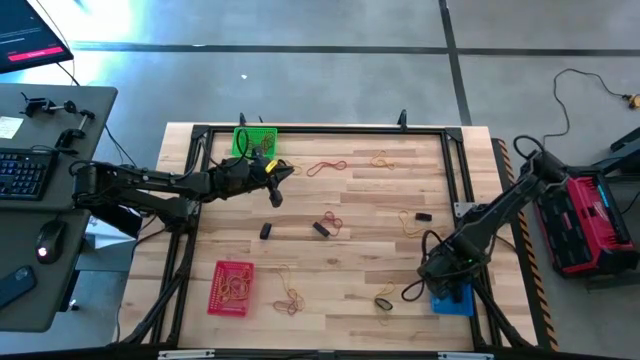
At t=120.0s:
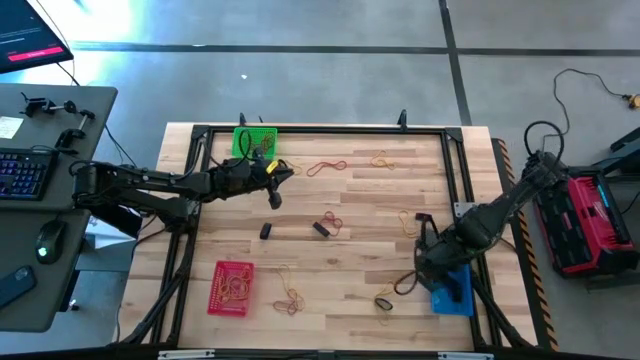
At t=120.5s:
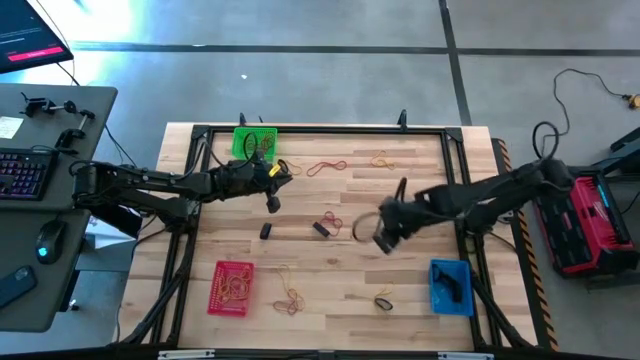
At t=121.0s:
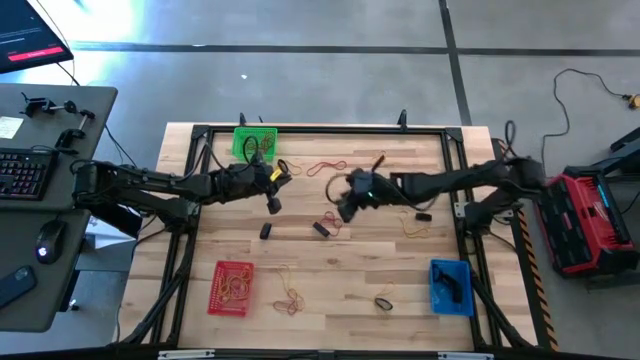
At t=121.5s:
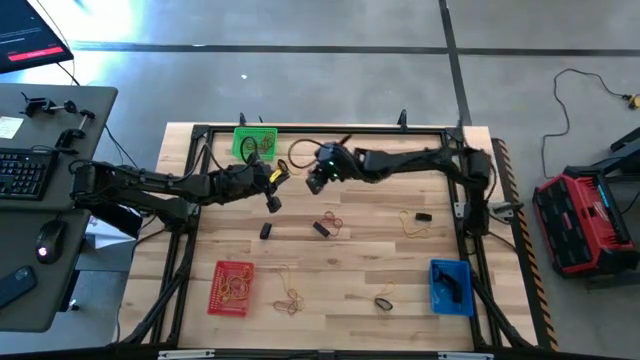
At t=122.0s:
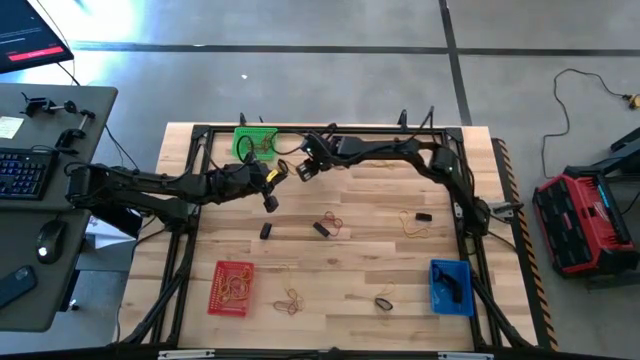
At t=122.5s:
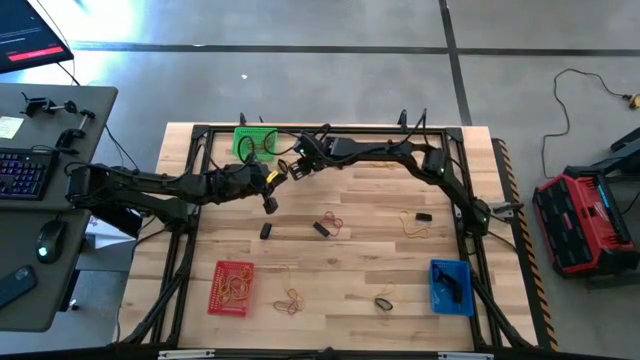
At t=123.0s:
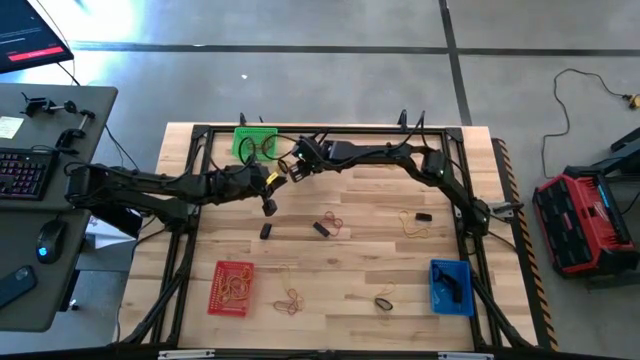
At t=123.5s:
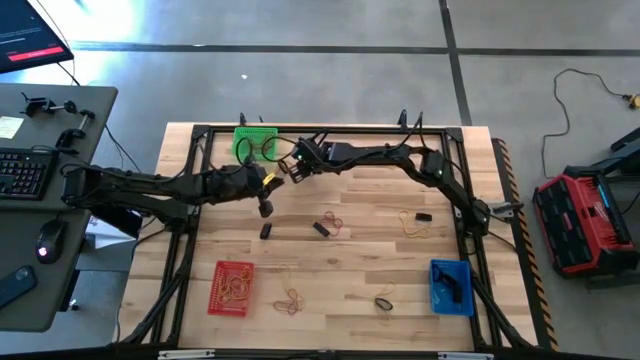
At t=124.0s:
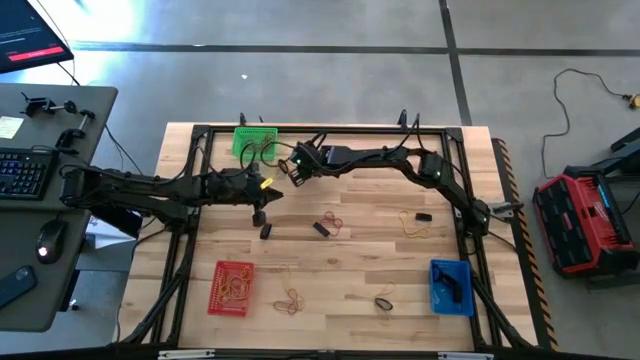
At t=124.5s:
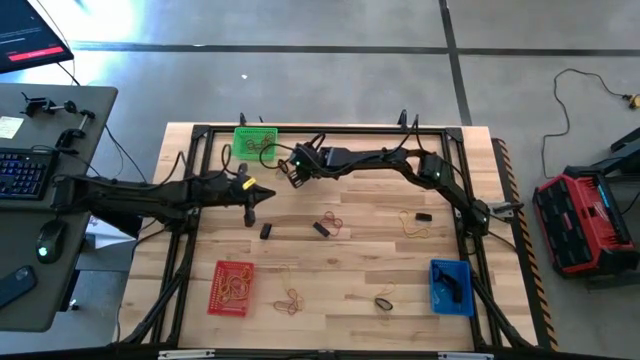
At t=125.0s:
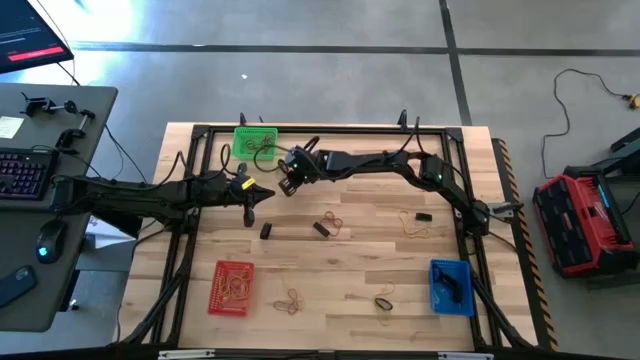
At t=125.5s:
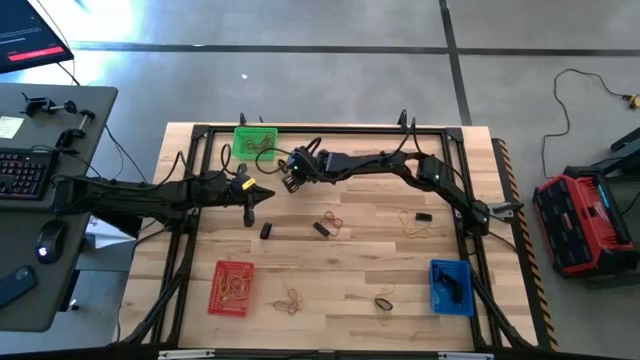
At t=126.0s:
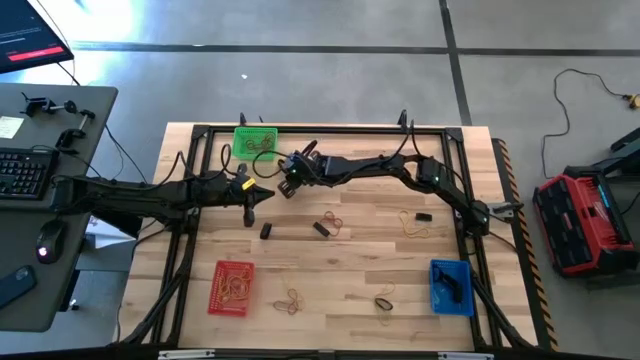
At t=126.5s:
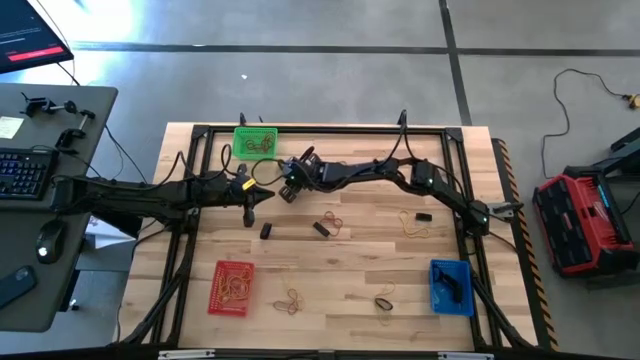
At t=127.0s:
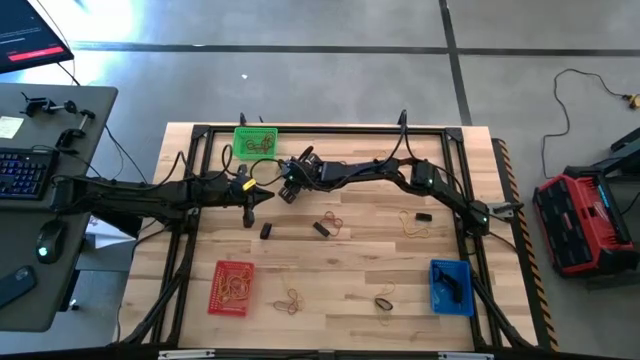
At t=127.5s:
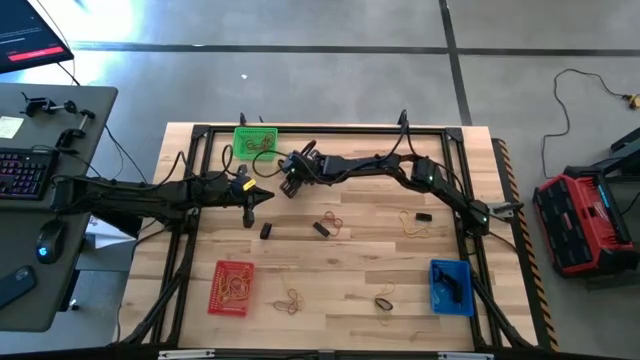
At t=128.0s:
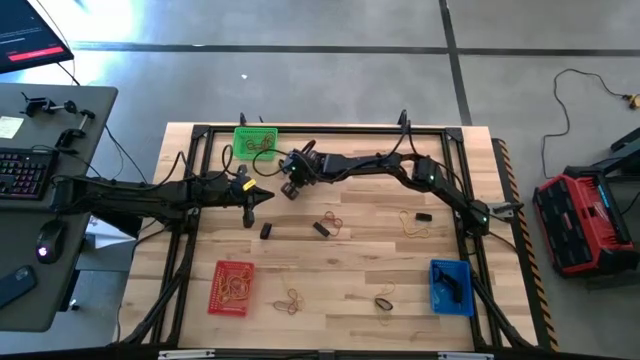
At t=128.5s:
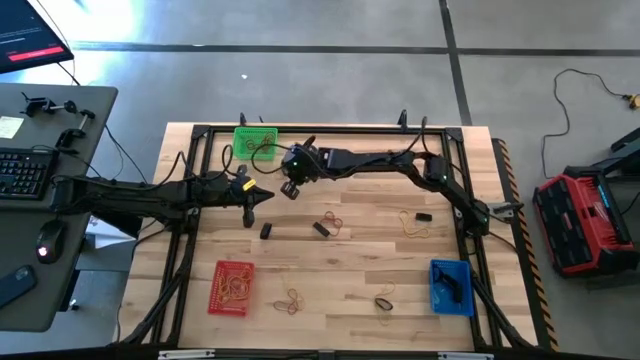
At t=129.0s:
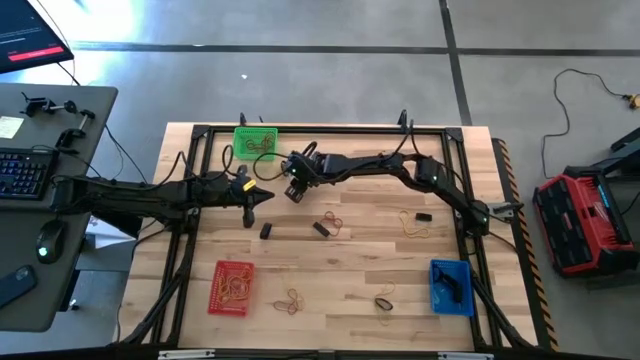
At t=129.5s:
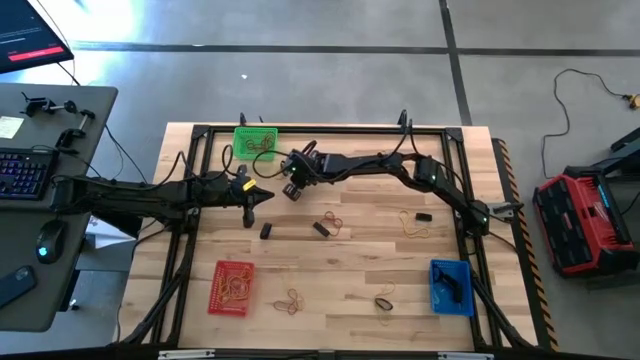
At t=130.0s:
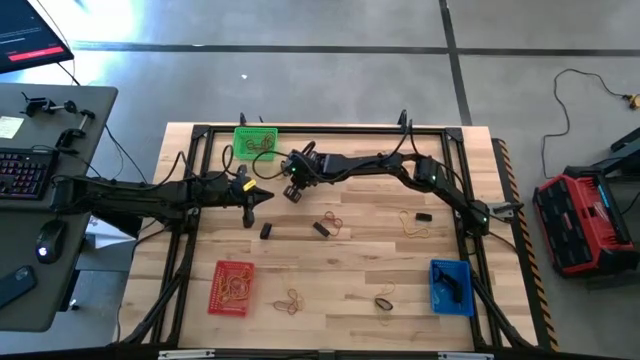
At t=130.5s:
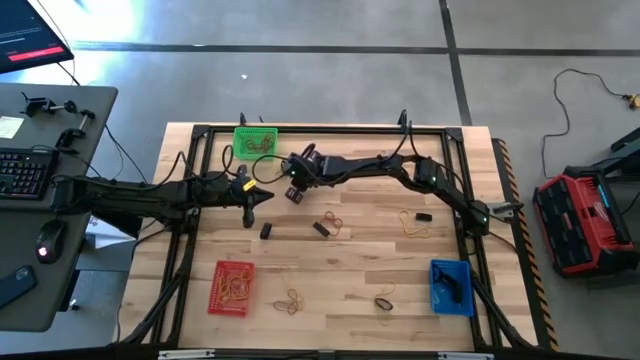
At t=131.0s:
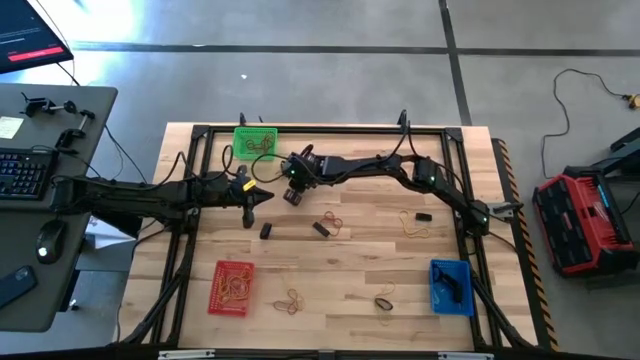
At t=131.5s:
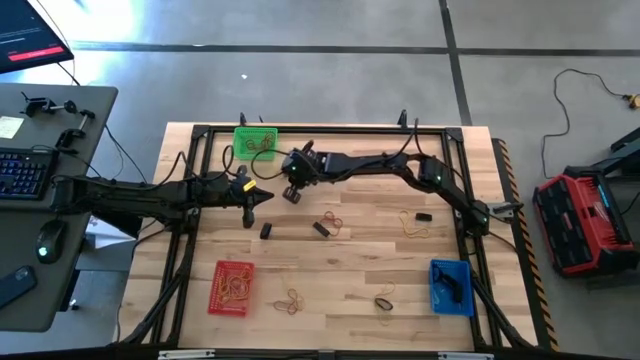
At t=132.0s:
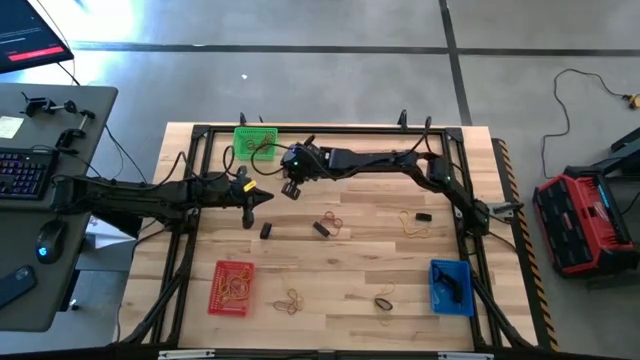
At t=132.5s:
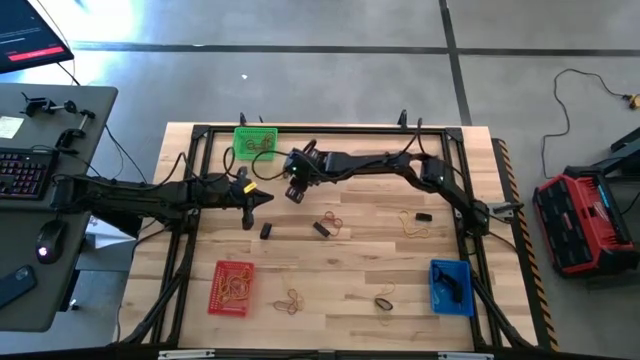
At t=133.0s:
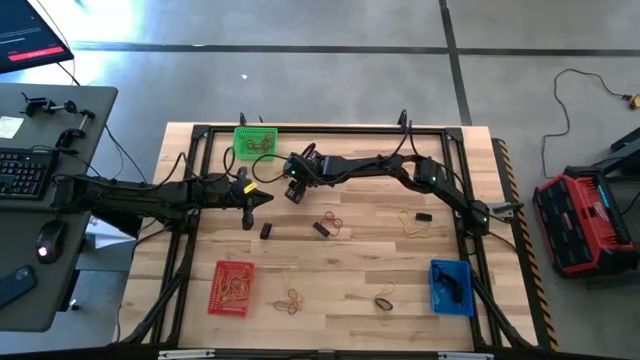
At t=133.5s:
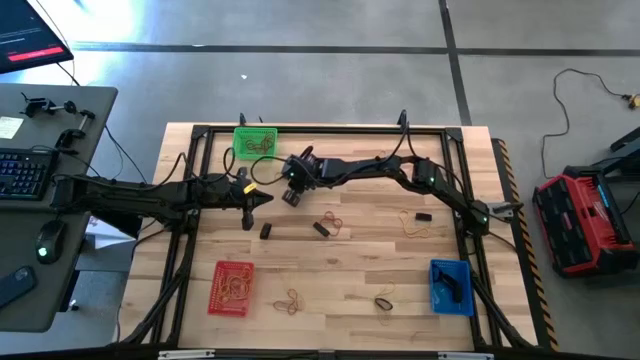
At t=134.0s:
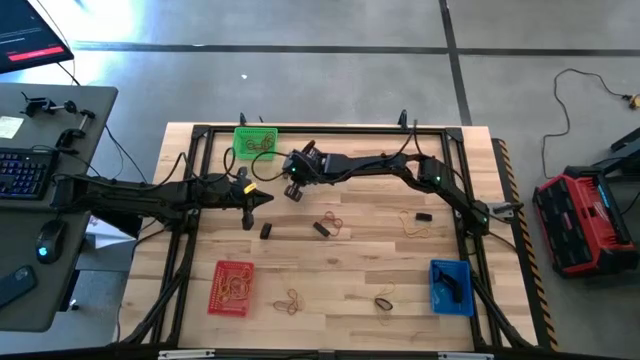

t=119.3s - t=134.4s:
Task: Sort rubber bands into baskets
Put the yellow rubber band into the red bin

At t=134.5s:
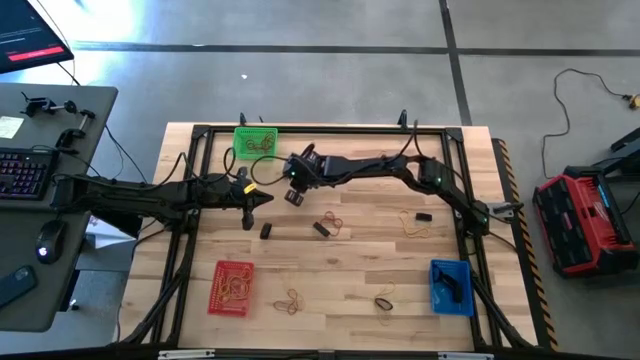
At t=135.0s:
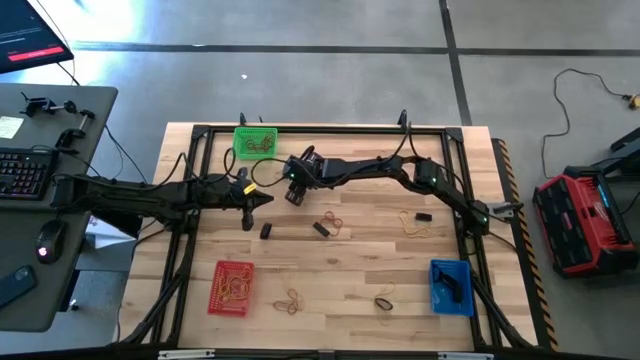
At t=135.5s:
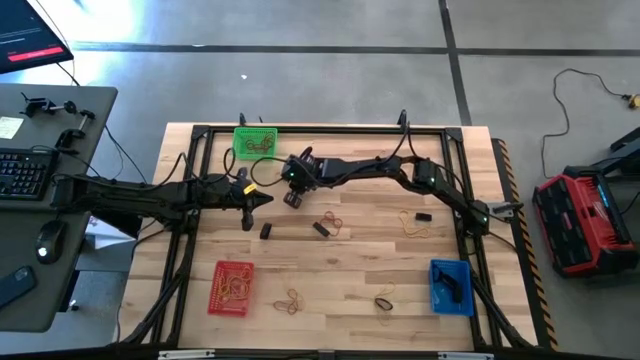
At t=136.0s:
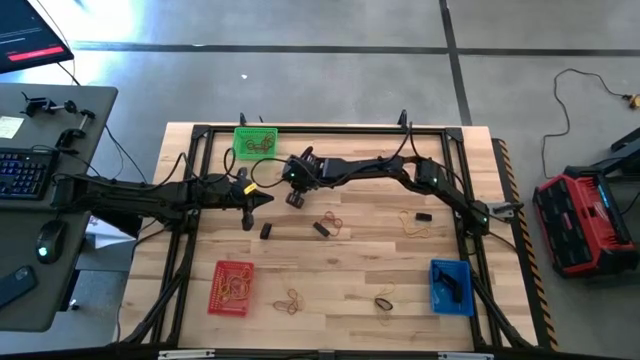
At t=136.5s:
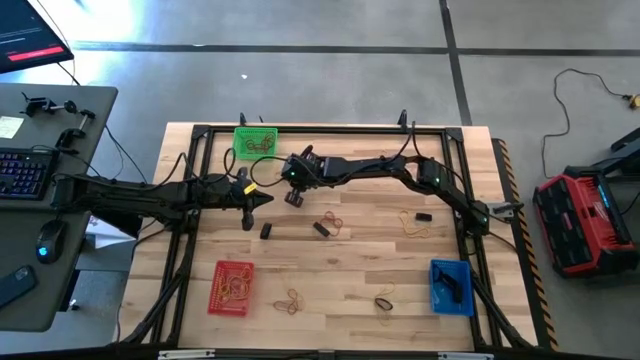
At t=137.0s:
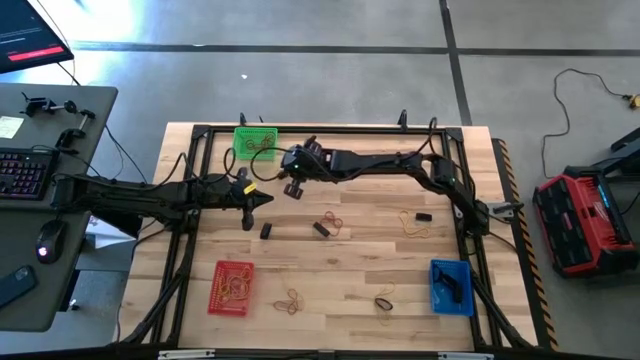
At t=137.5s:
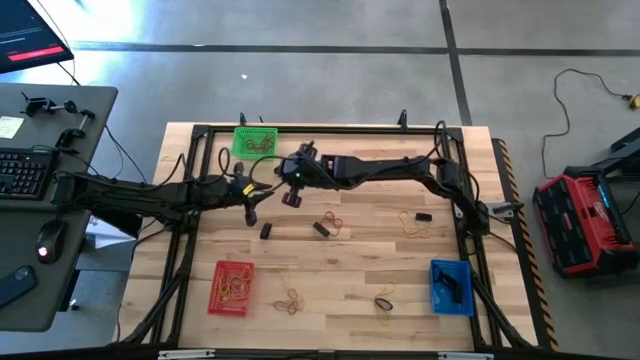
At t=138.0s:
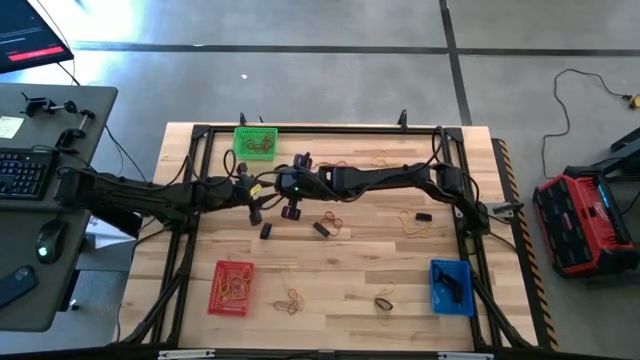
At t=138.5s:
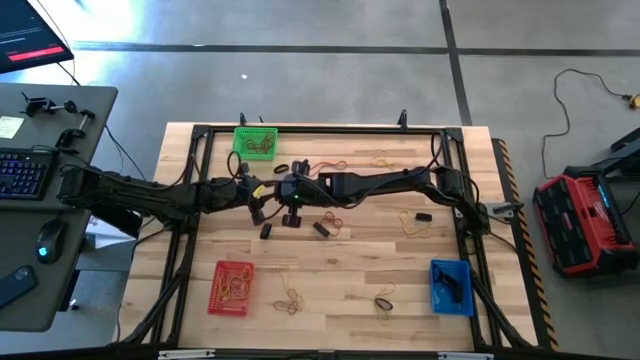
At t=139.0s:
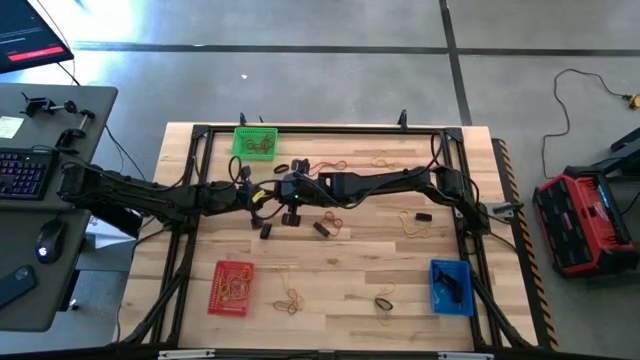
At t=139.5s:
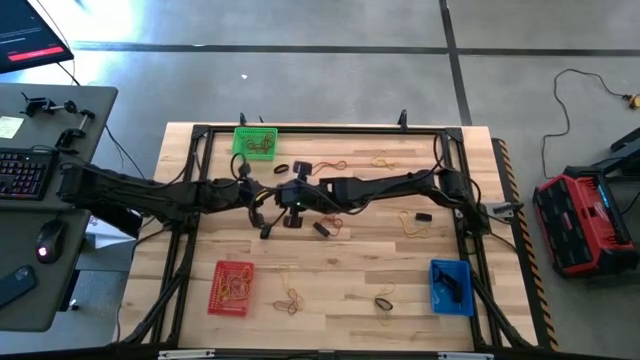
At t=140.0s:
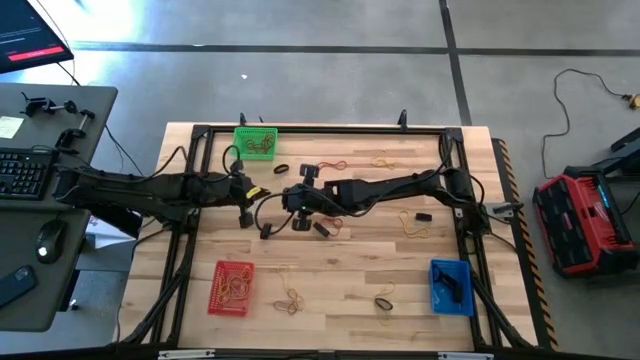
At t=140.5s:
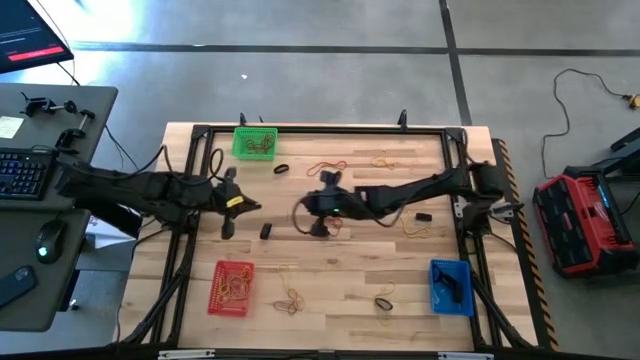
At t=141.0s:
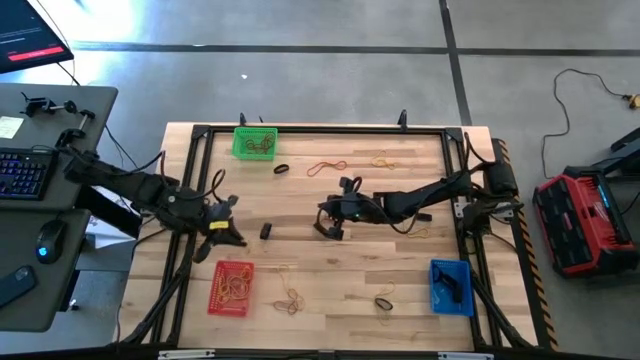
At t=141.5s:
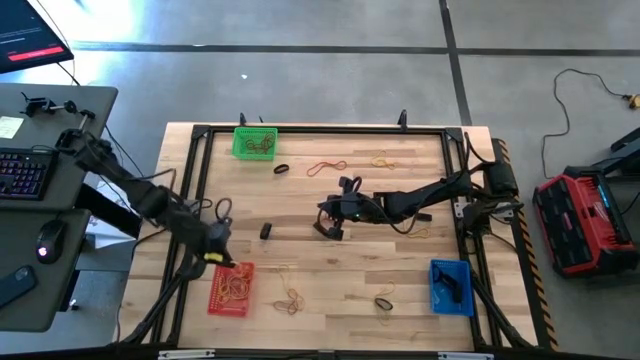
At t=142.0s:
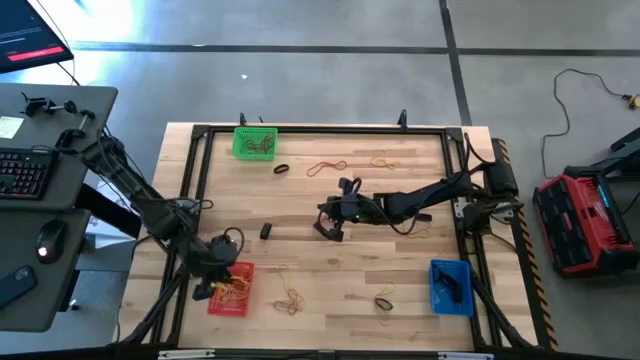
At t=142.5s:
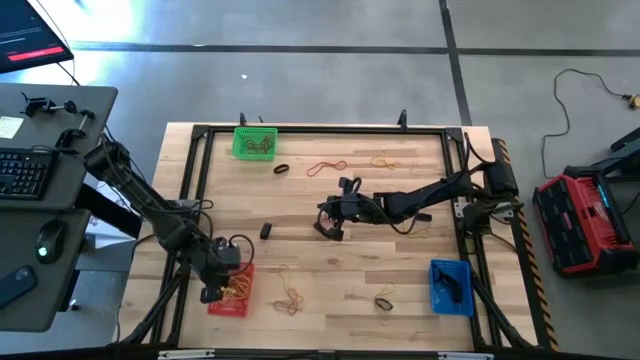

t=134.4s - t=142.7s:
Put the yellow rubber band into the red bin
